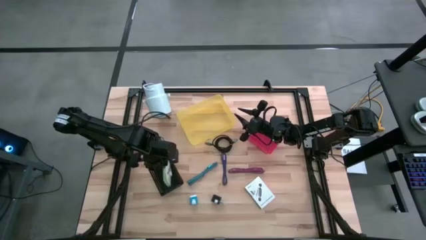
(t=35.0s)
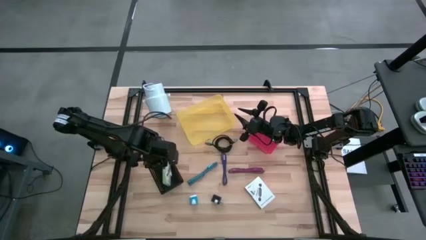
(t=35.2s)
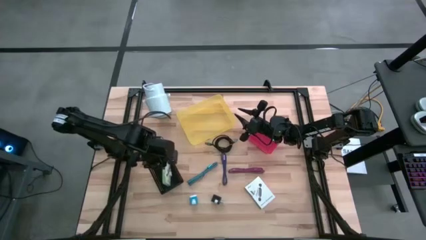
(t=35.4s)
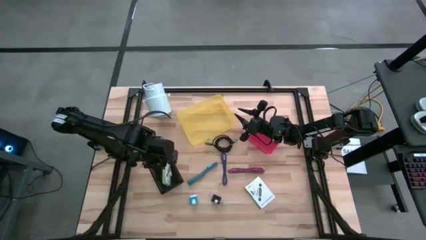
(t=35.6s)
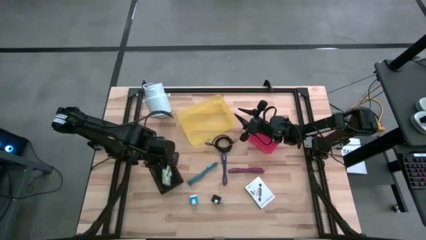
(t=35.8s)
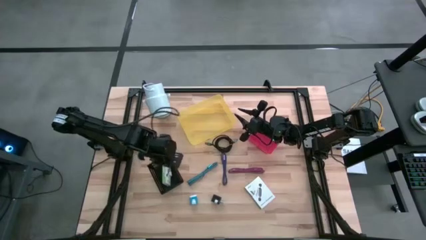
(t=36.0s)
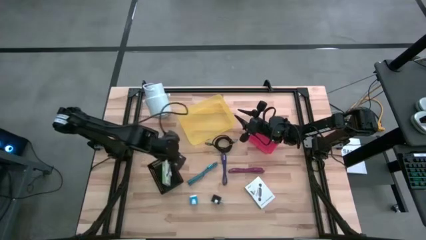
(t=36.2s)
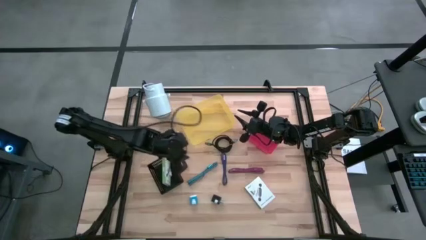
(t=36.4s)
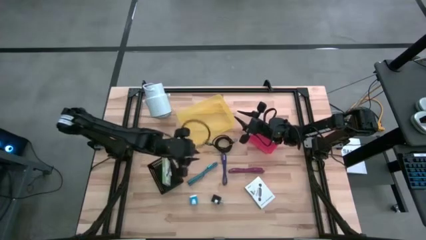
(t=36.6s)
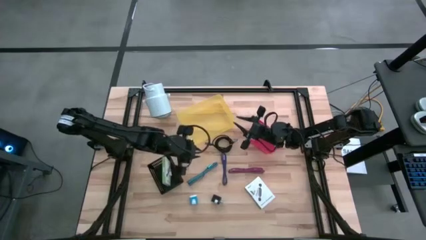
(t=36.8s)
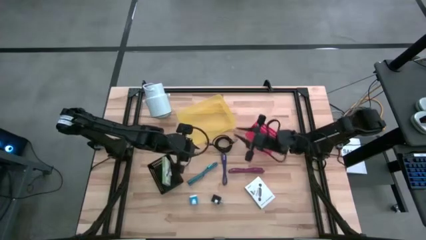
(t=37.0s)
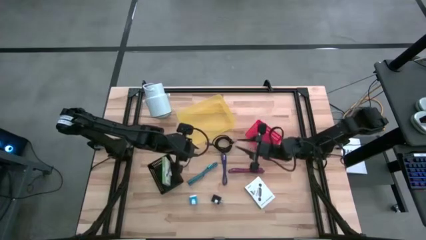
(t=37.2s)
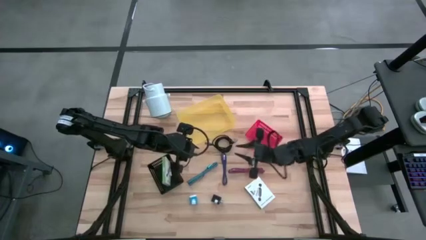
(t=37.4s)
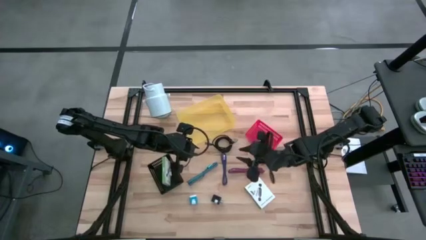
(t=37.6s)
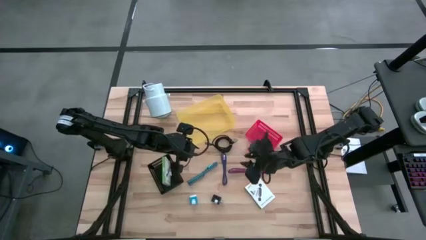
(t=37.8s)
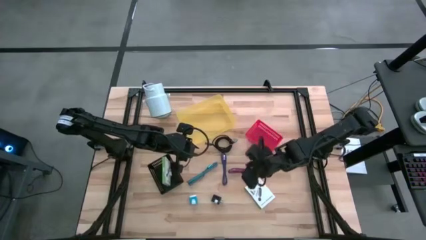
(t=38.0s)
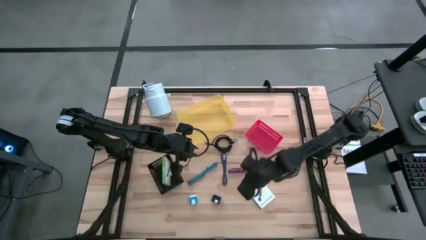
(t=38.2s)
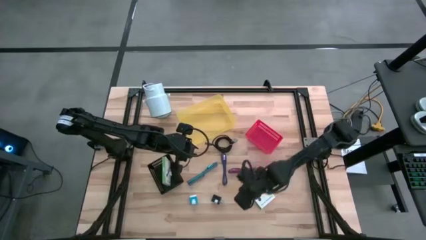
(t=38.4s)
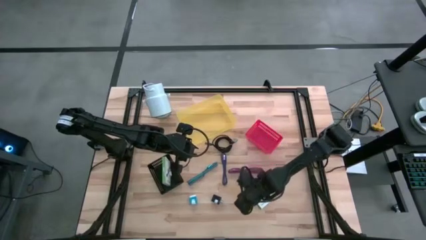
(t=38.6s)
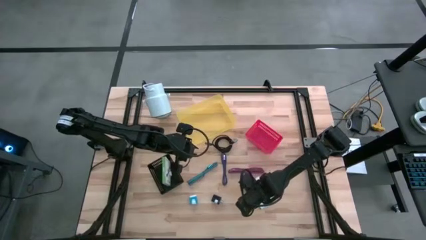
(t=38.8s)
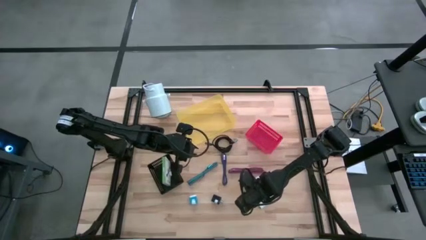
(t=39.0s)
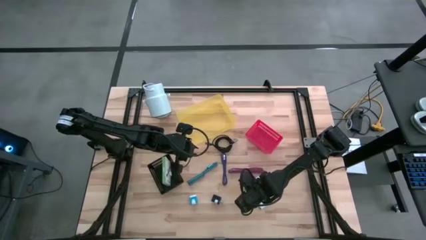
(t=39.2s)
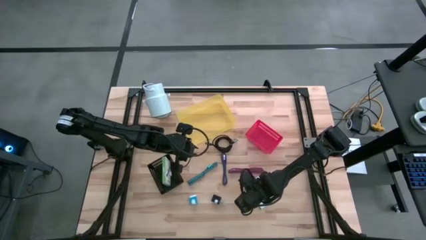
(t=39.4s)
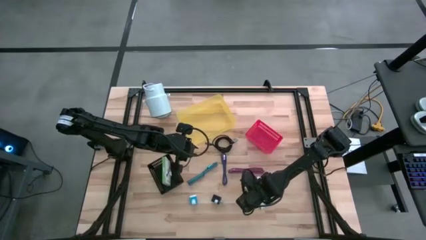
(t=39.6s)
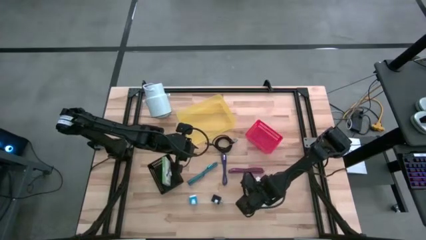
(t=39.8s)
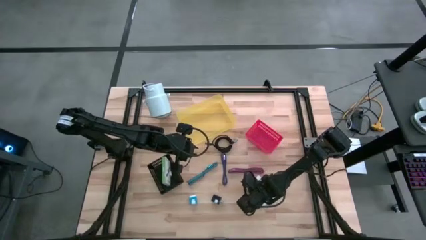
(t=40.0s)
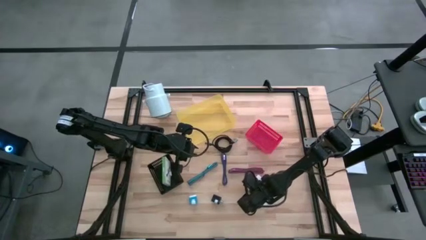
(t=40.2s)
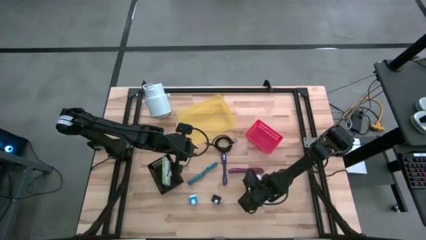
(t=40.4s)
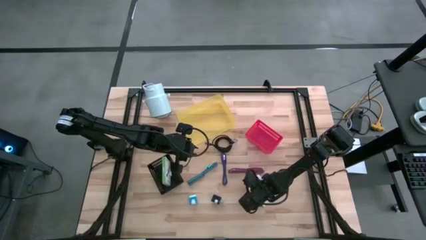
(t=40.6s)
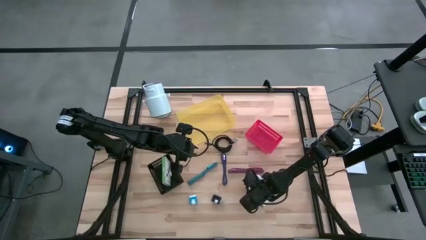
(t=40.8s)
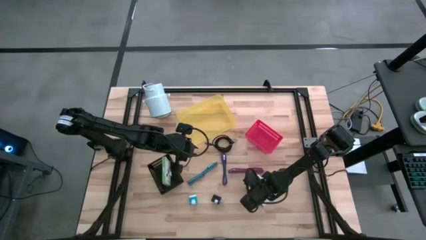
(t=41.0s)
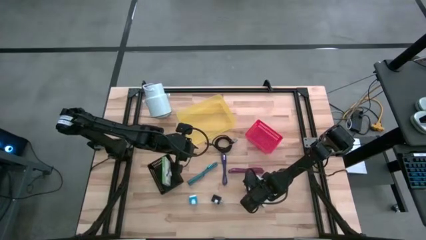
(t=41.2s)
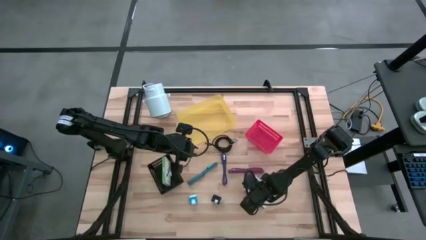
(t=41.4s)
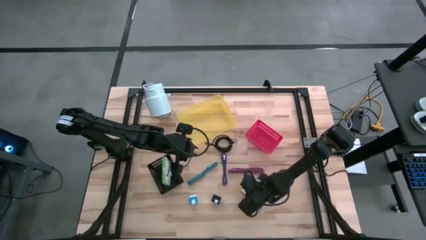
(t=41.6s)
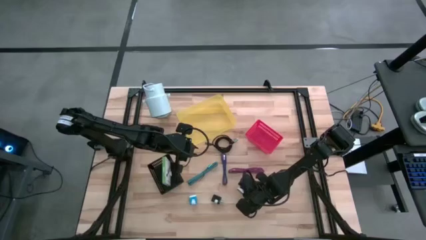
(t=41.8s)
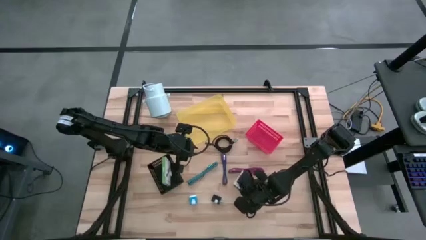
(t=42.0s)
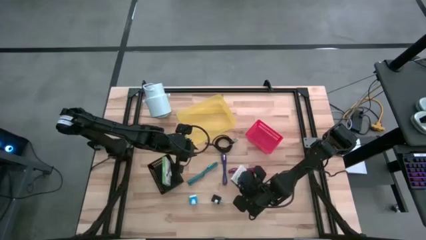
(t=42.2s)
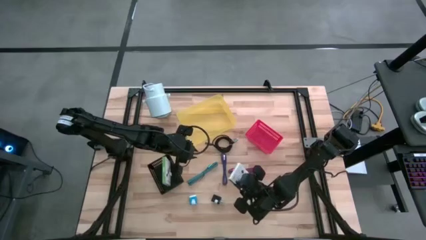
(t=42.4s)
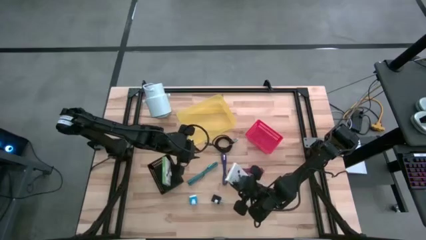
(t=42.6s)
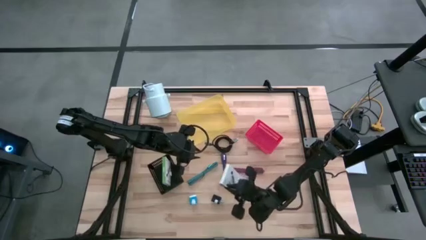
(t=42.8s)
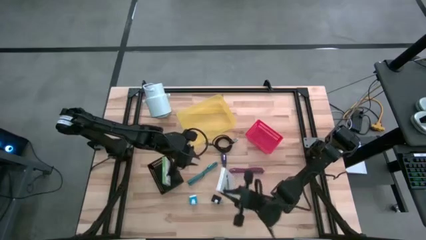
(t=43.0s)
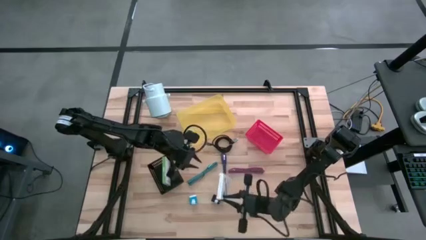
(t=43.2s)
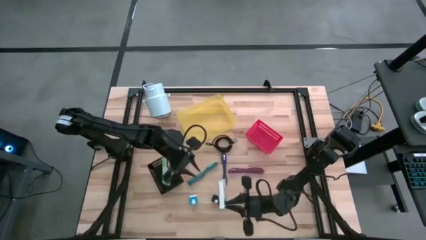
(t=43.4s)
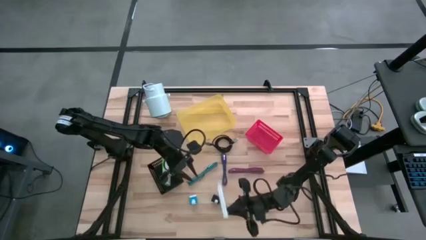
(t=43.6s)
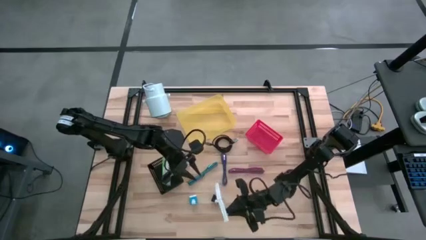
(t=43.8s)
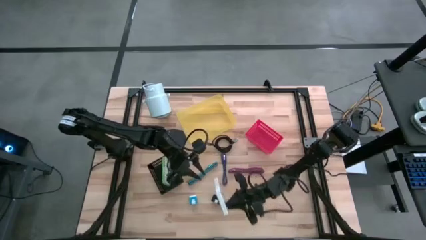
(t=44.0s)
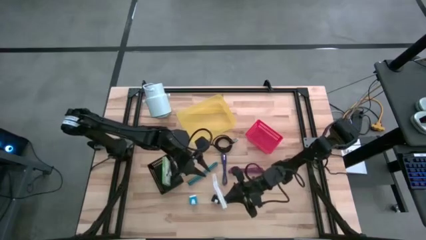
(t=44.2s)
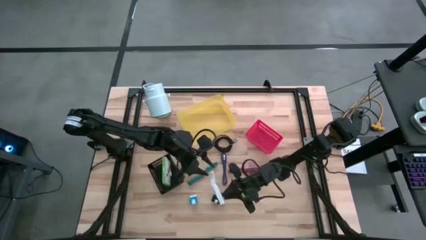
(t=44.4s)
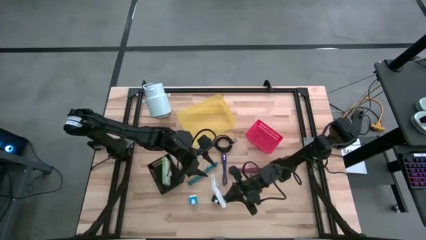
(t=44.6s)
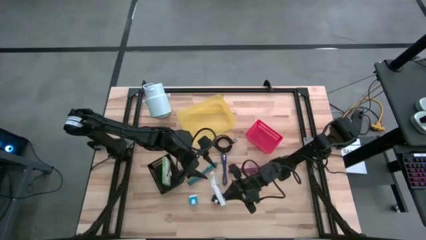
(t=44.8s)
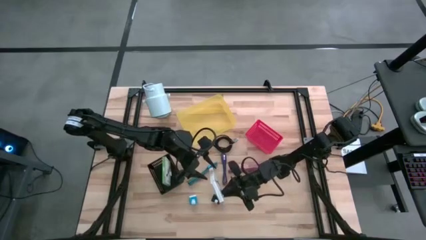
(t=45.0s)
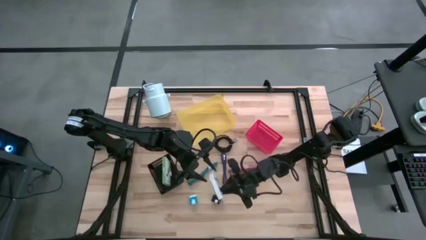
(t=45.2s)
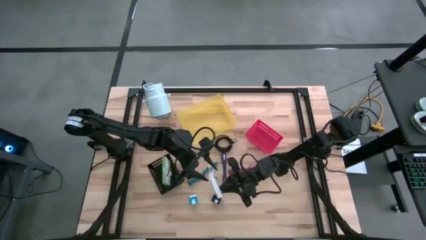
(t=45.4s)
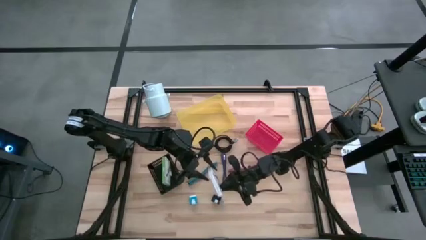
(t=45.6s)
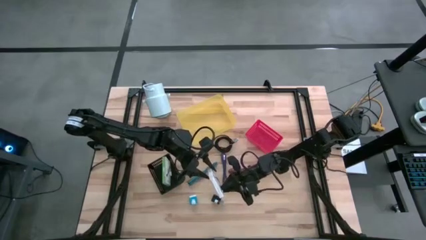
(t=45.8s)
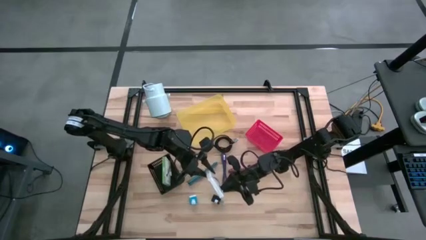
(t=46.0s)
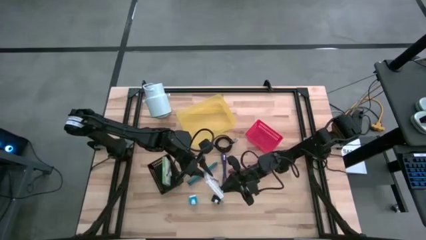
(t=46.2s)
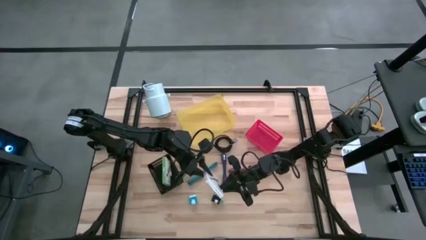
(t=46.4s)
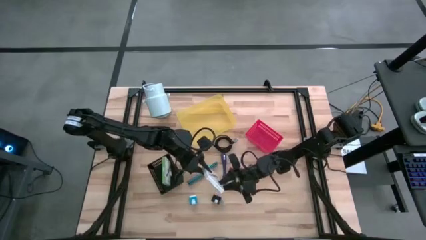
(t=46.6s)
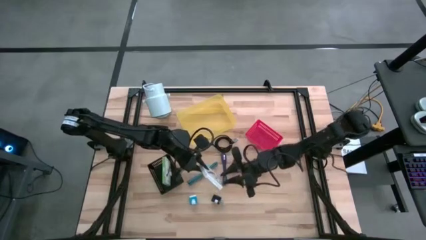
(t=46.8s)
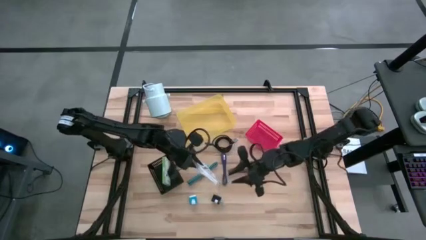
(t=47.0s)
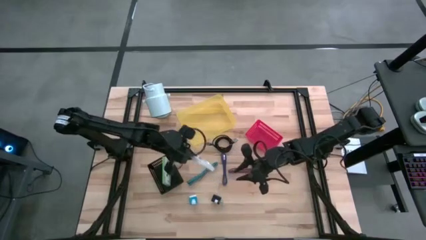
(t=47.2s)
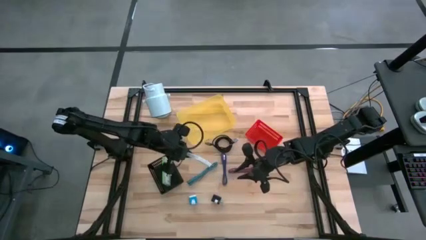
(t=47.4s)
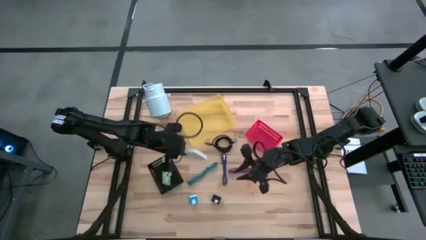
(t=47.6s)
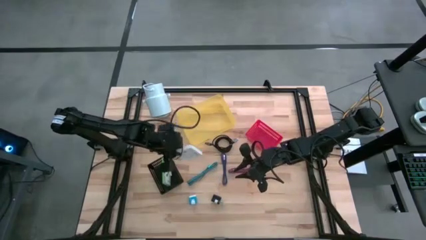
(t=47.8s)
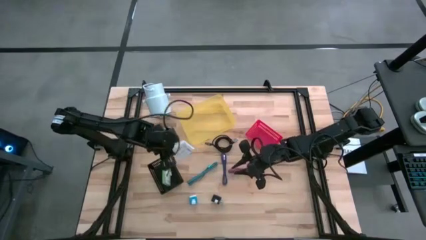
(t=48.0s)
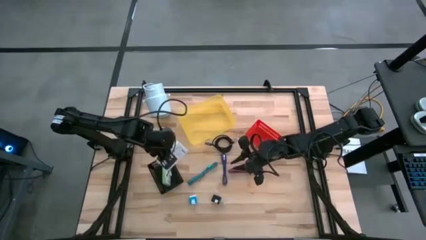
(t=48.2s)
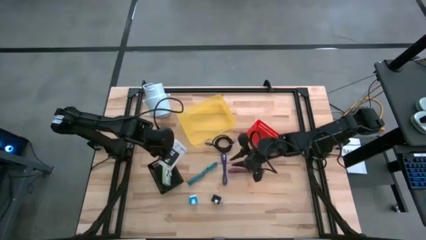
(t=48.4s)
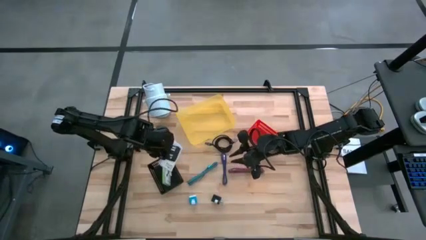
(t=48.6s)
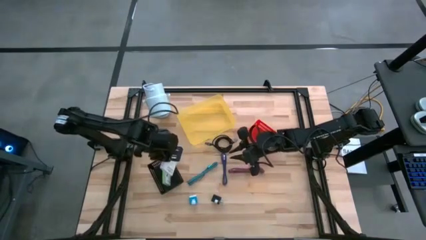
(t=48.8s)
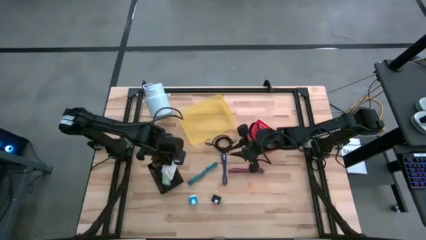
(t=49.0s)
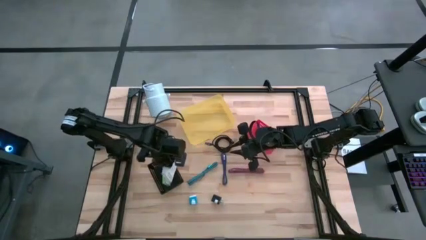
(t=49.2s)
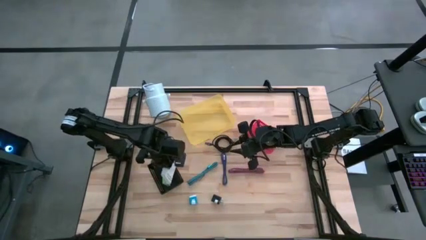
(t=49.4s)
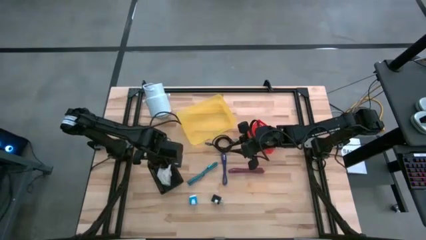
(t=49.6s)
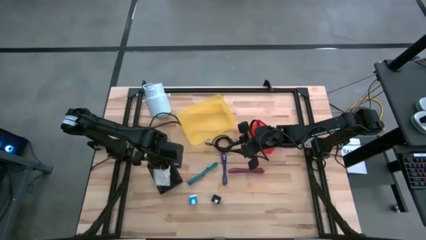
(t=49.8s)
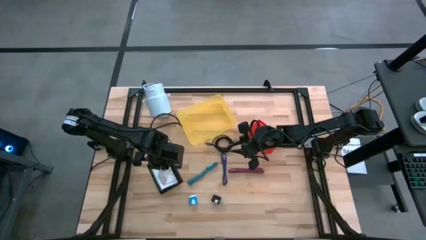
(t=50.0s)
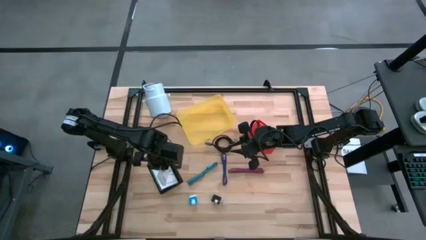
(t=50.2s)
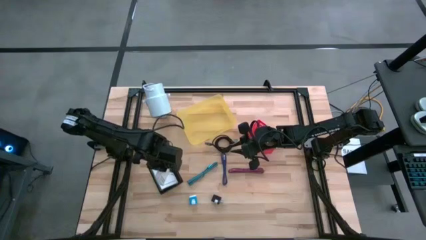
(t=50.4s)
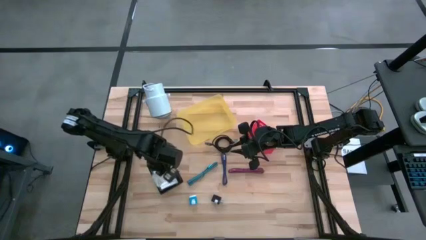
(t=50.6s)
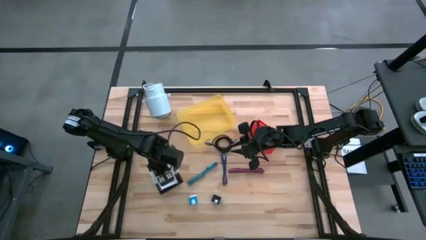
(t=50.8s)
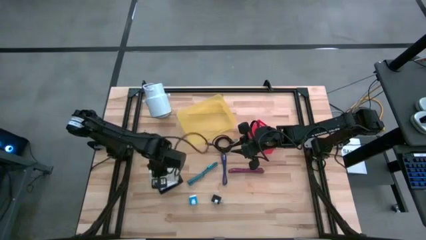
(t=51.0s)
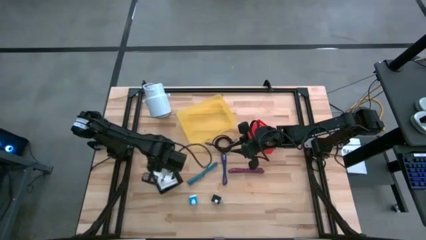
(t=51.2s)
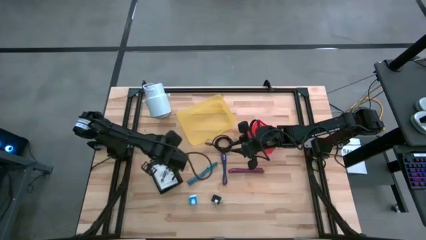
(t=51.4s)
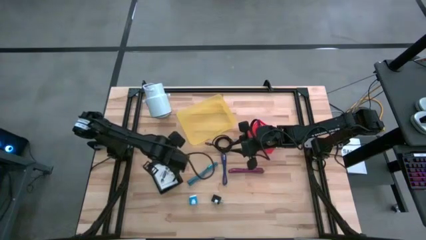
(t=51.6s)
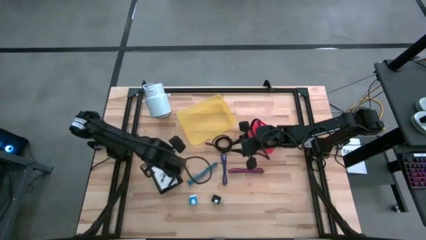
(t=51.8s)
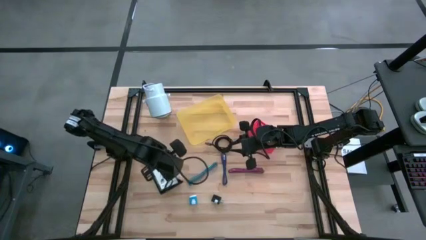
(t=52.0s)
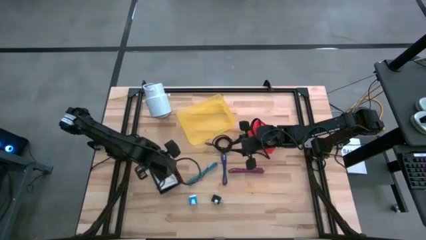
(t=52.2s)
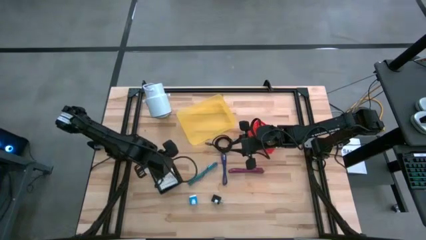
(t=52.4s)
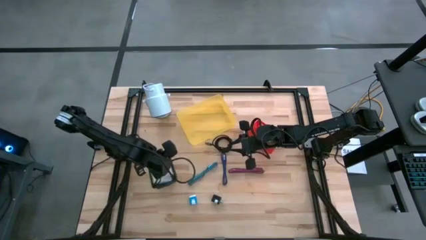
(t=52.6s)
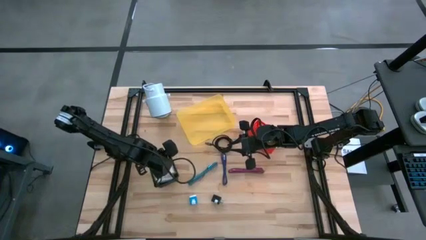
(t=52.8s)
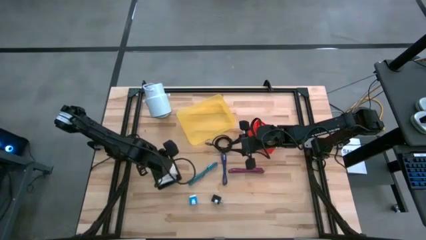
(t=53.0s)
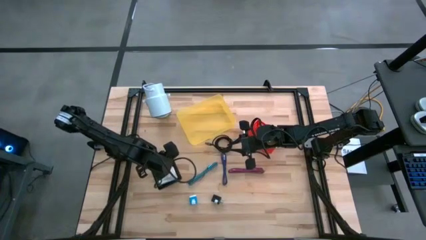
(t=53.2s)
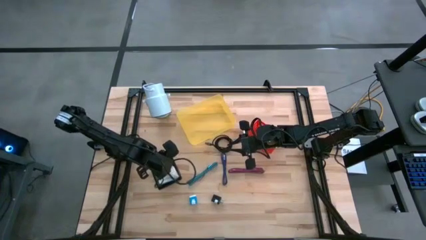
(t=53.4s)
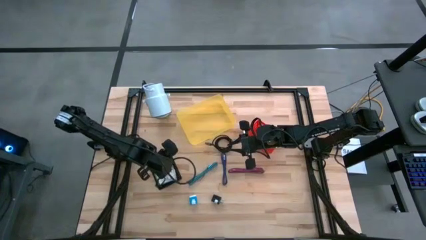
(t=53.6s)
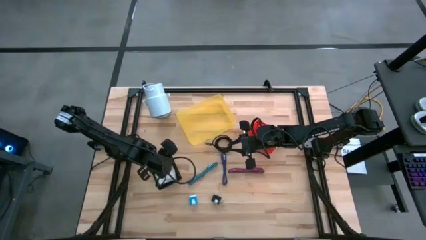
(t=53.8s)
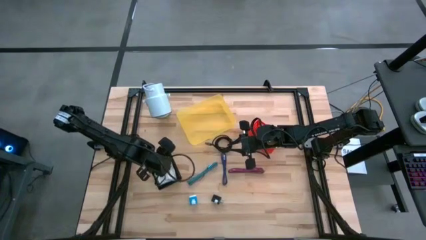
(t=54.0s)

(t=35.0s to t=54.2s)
Task: Pick and place items into bin
Put the card reader box into the black bin
